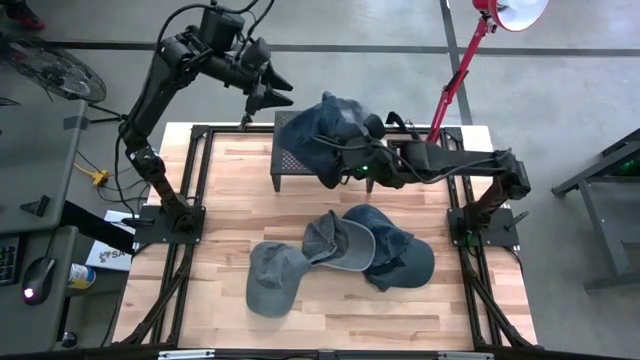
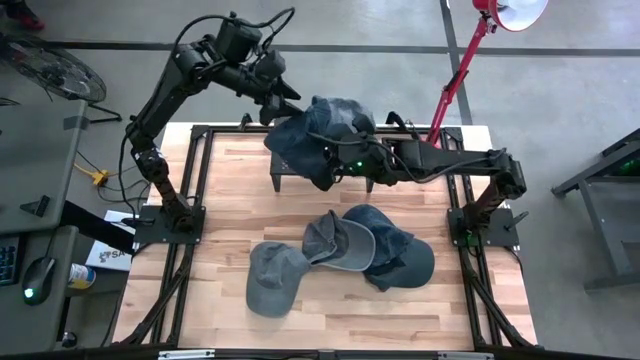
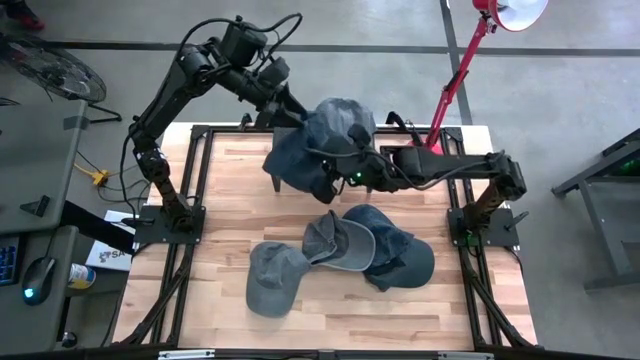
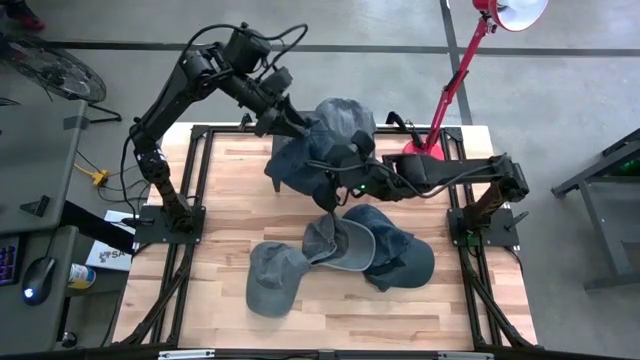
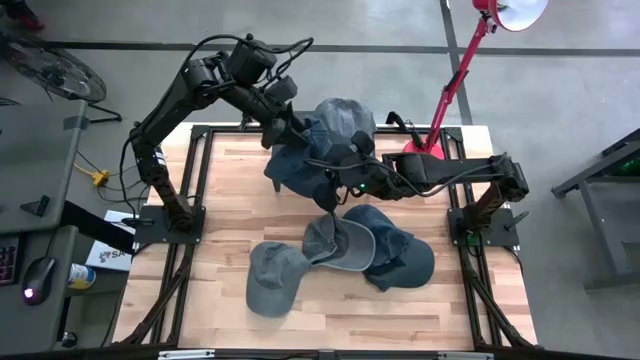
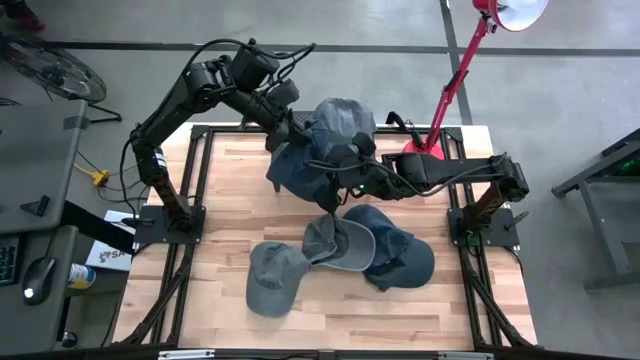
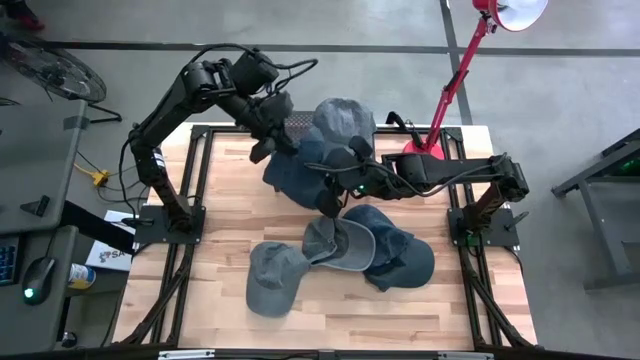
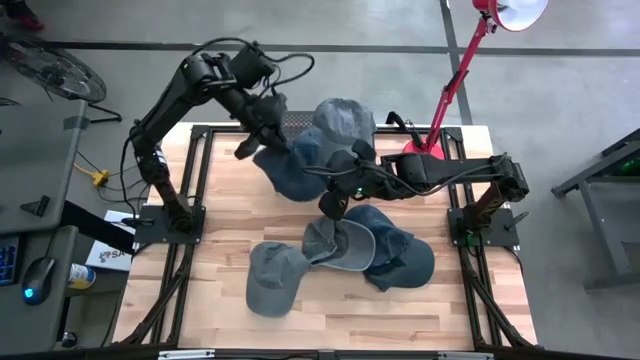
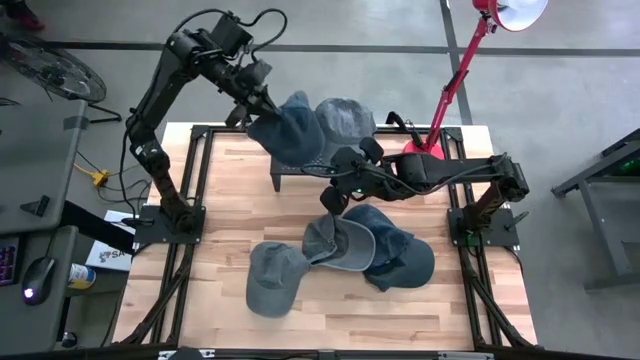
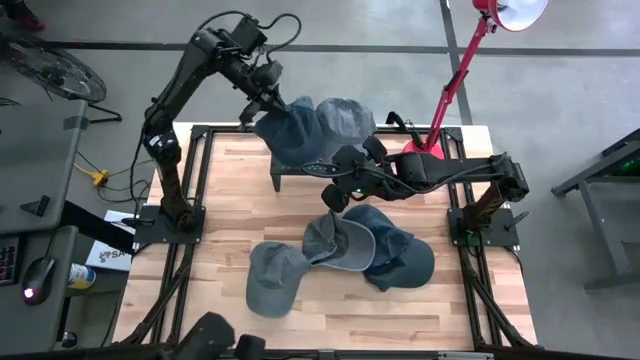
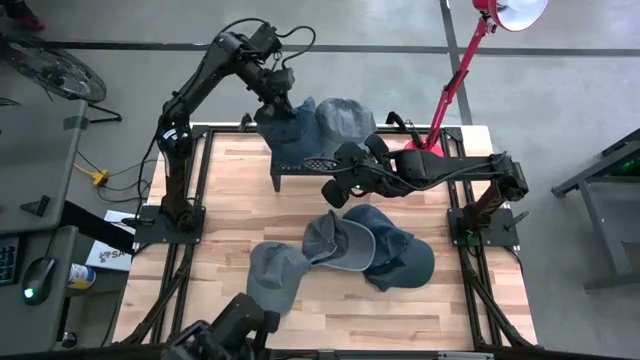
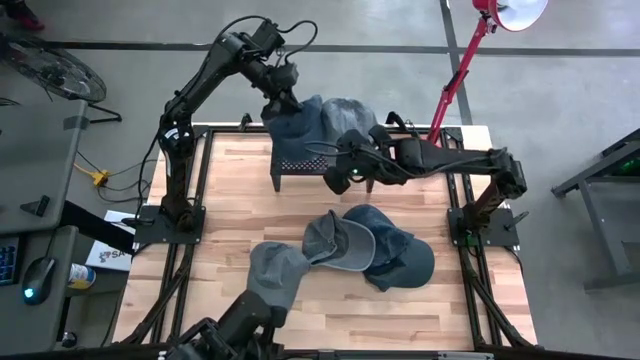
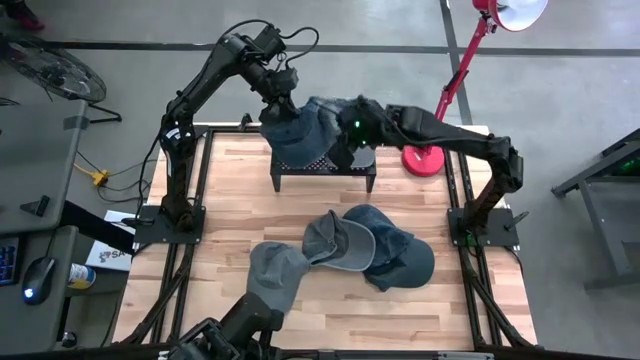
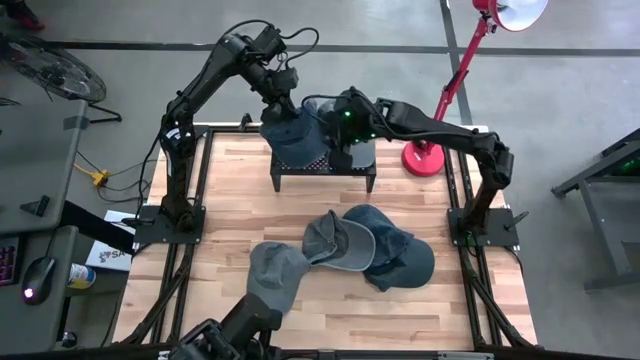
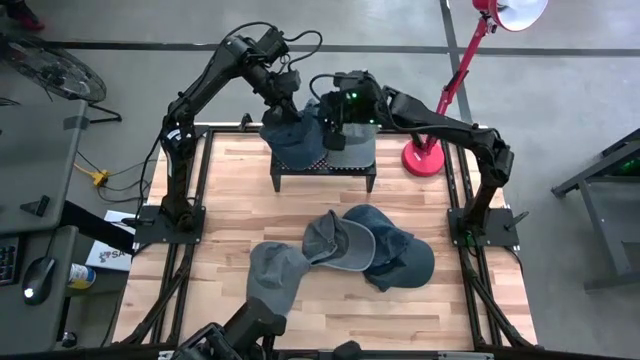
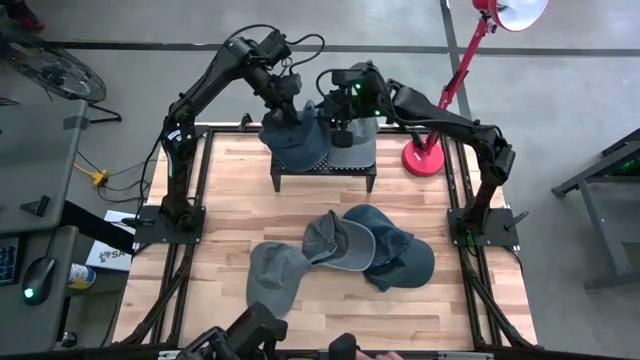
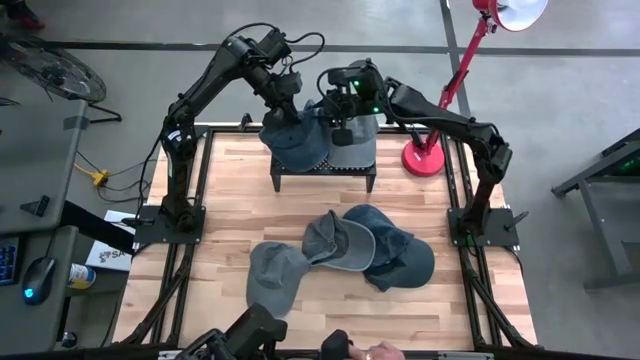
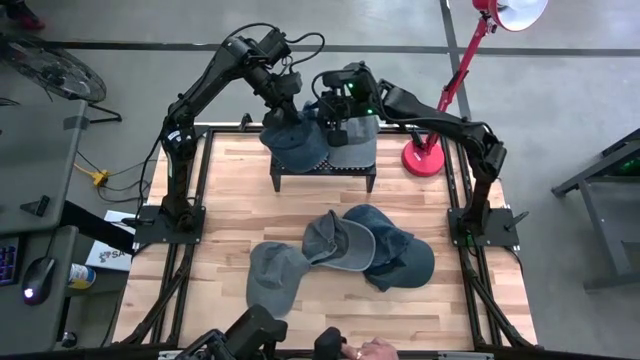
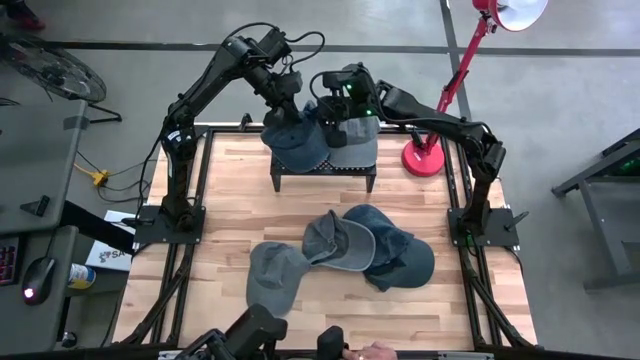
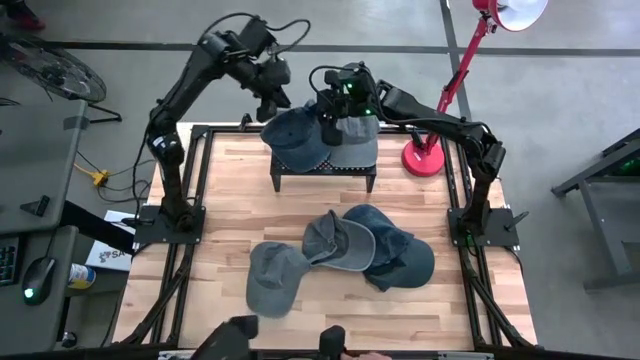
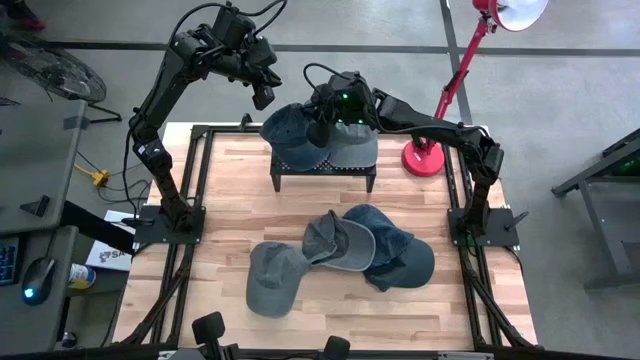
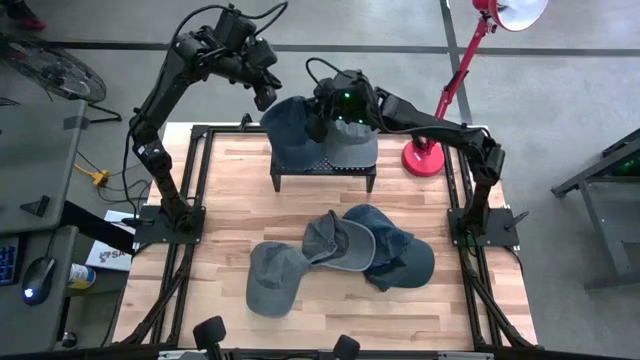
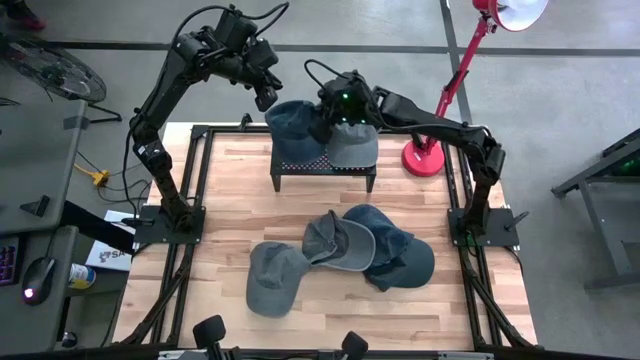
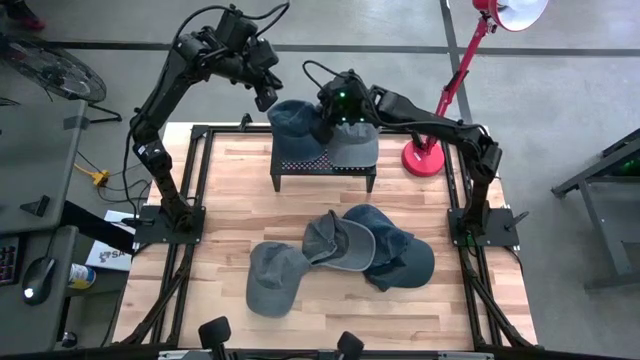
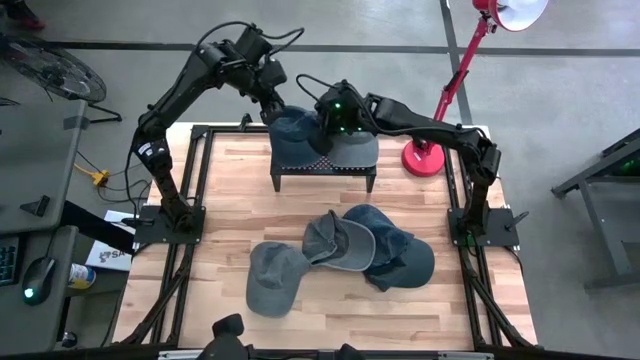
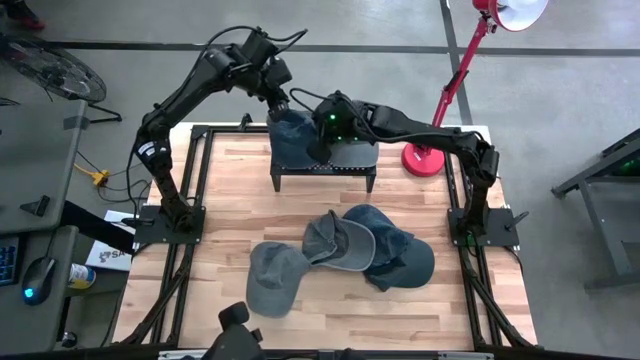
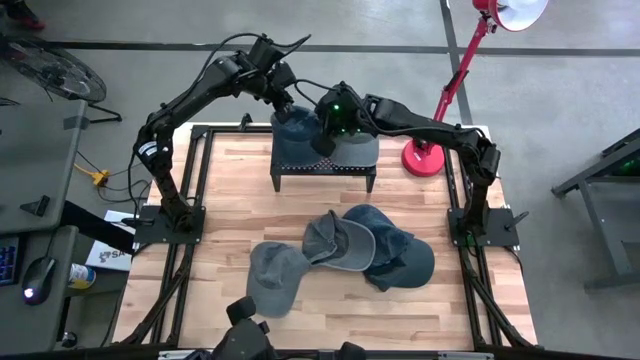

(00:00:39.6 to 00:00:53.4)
Task: Pick & Place hat
Put the left blue cap on the shelf

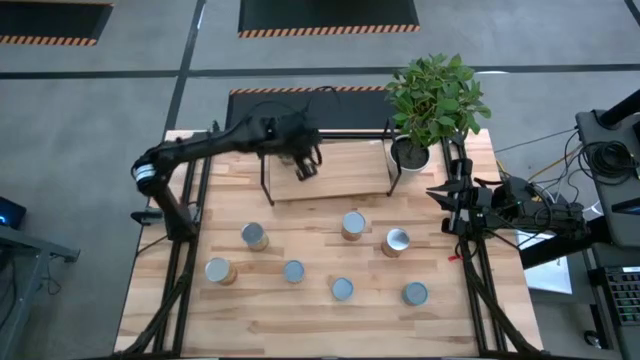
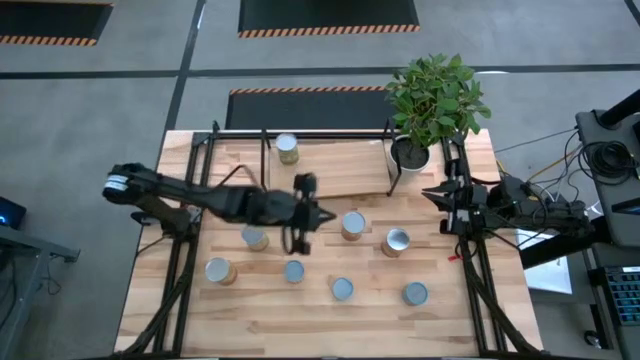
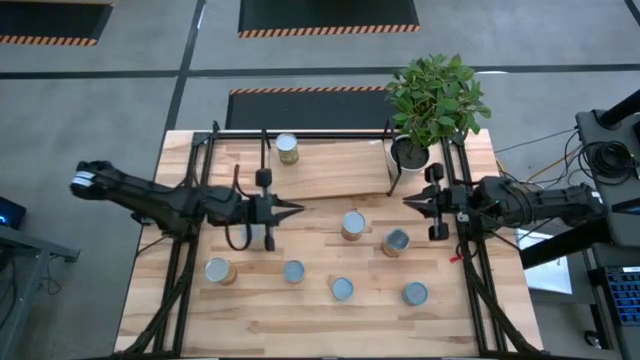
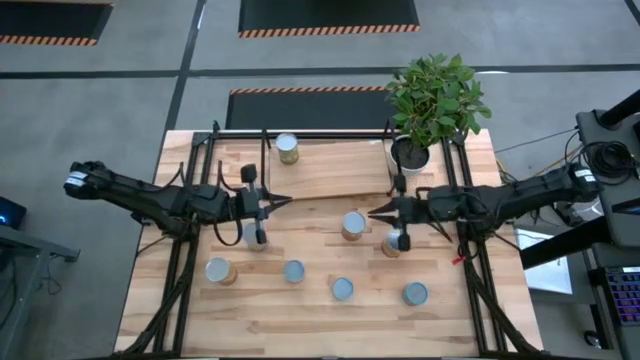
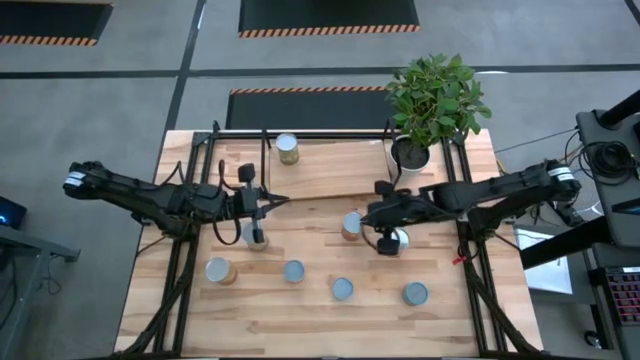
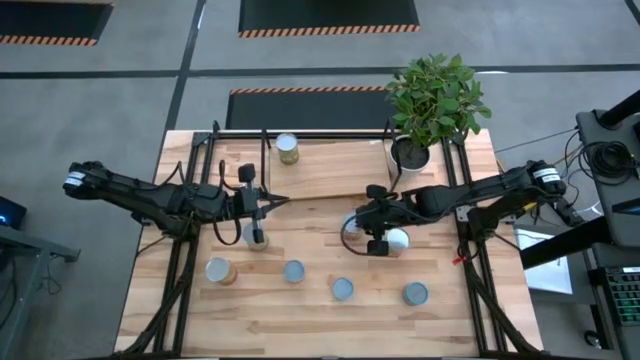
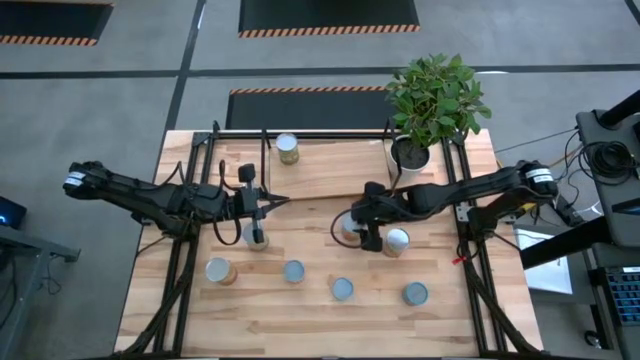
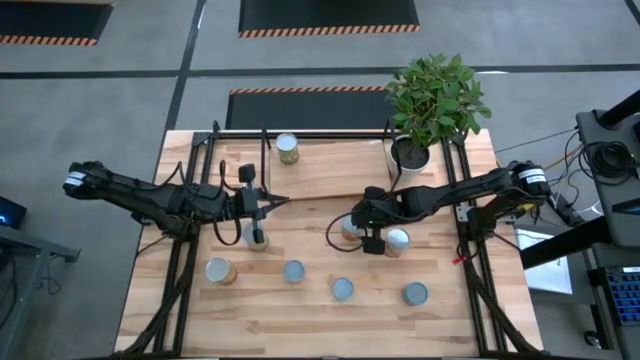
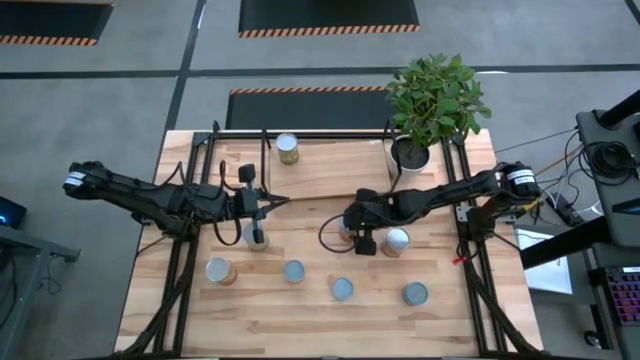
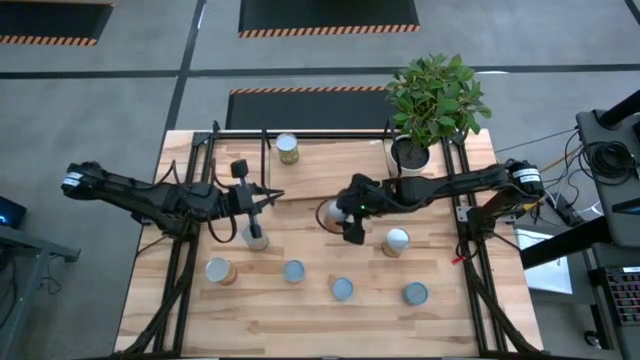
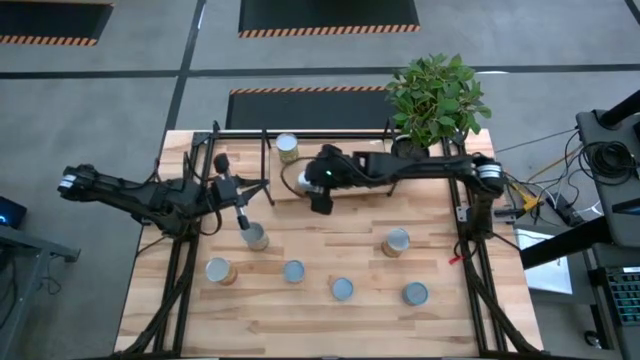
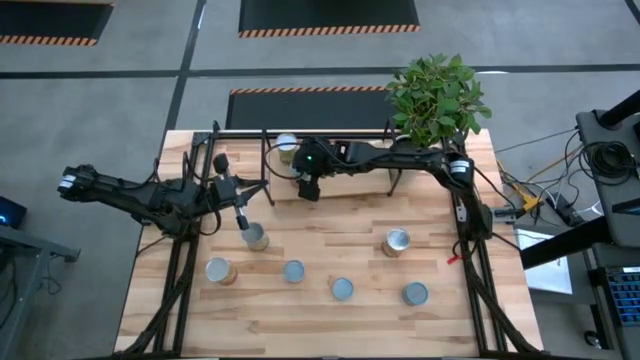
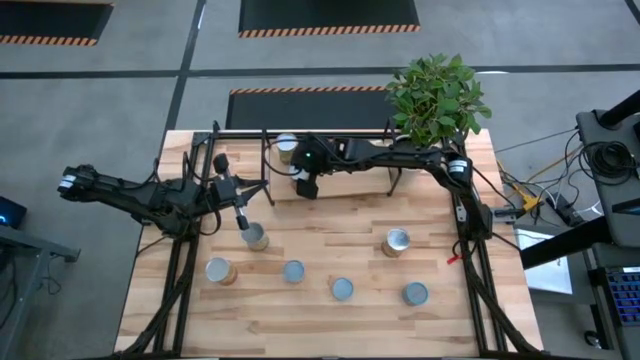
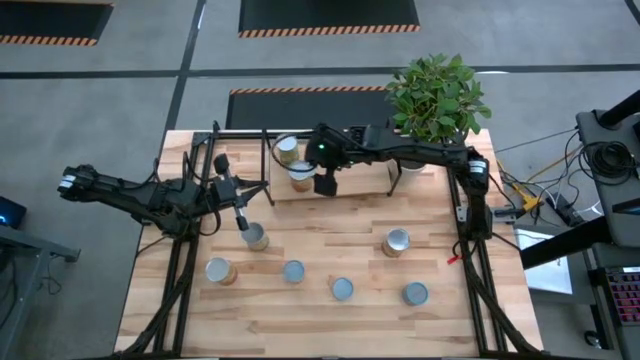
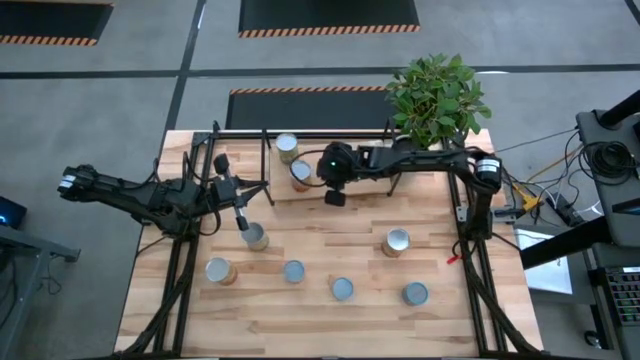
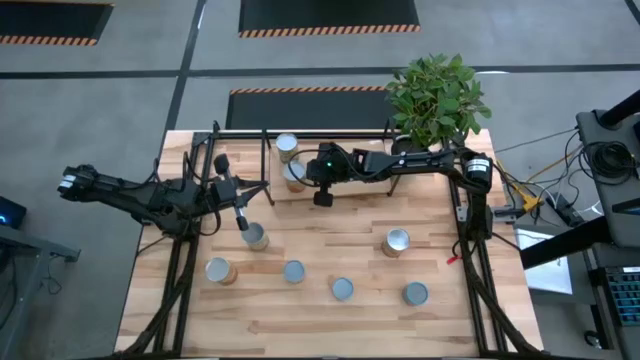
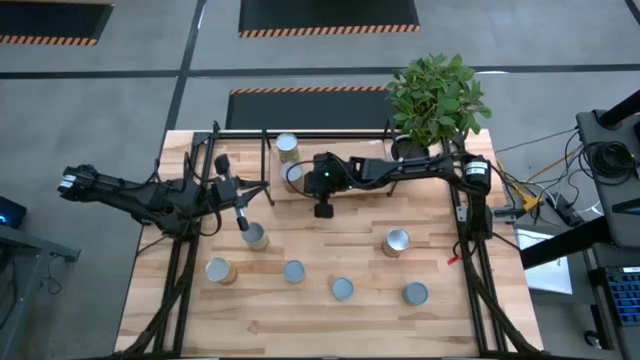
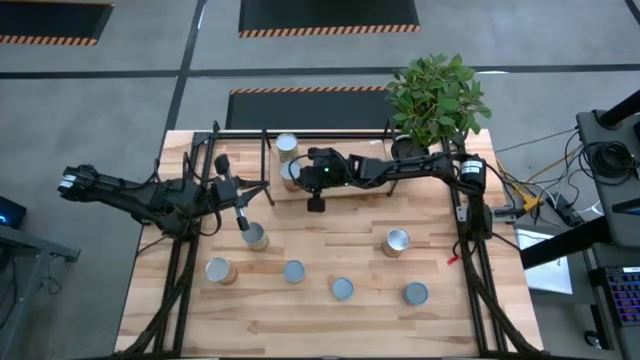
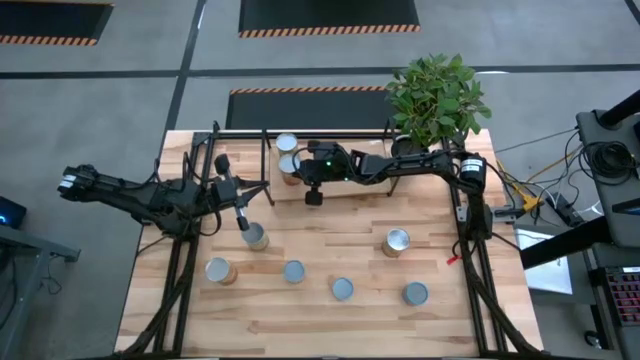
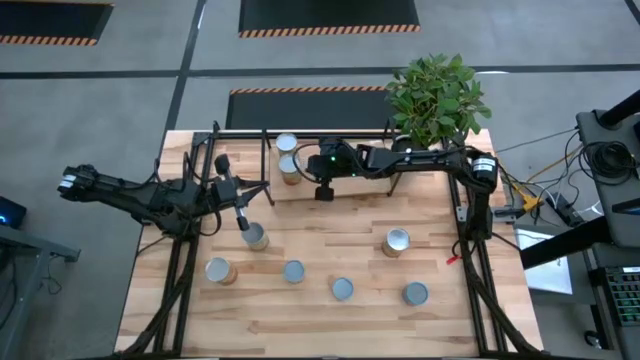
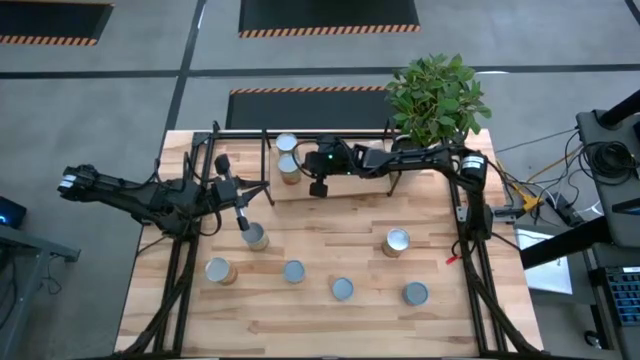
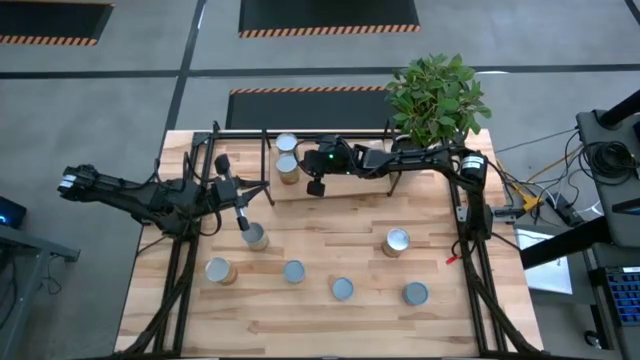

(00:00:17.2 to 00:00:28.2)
Task: Pick and place cans onto a shelf
Put the canned green beans on the shelf
